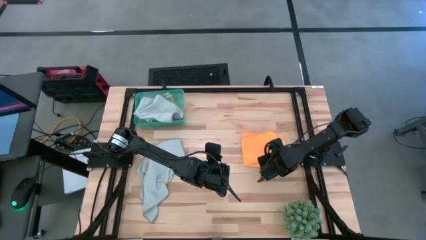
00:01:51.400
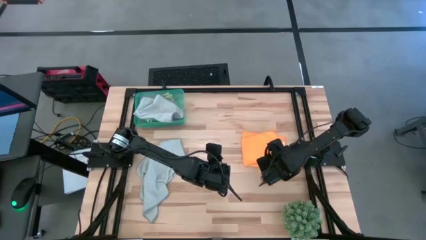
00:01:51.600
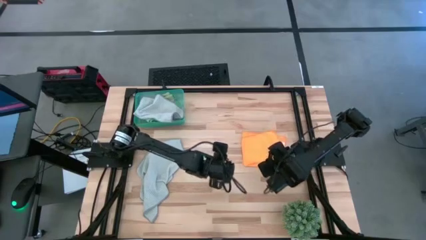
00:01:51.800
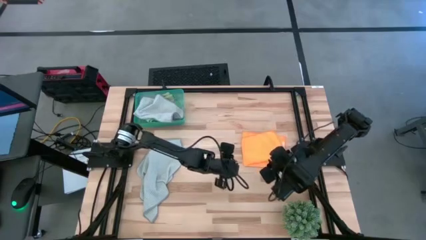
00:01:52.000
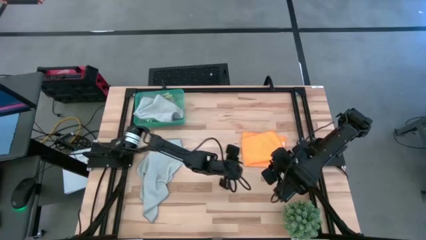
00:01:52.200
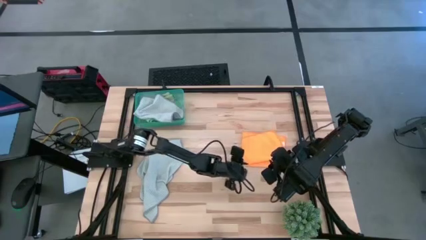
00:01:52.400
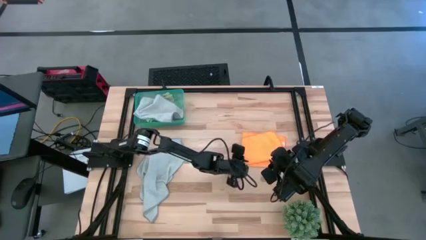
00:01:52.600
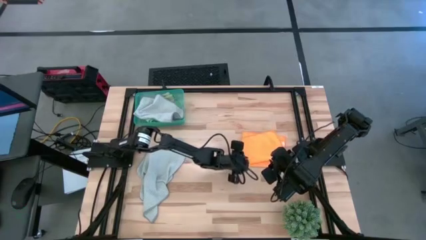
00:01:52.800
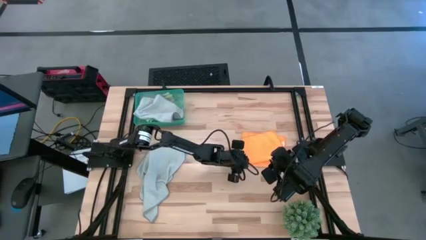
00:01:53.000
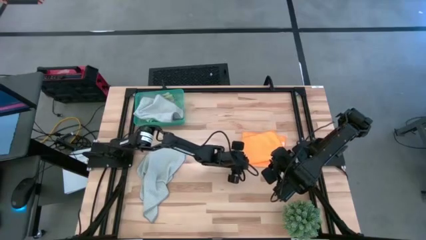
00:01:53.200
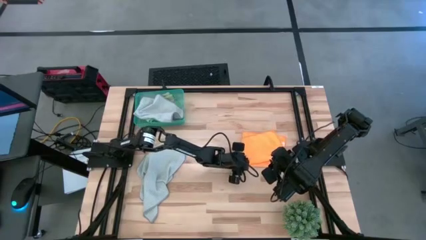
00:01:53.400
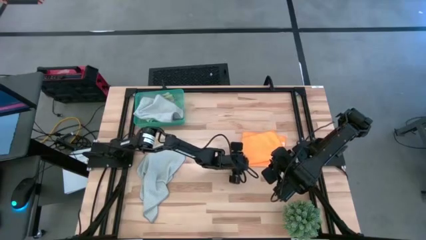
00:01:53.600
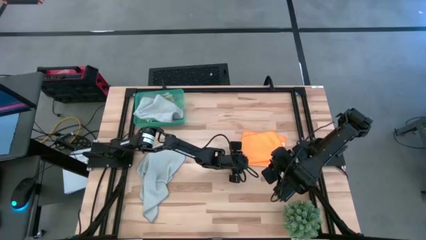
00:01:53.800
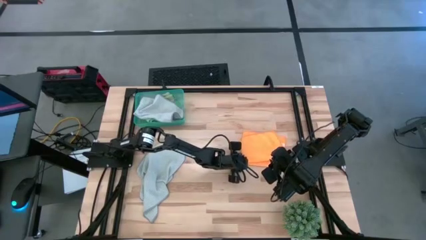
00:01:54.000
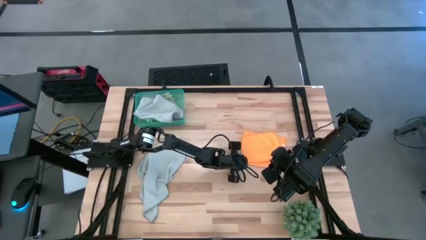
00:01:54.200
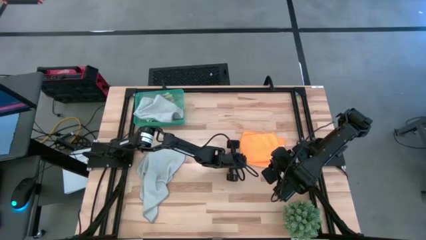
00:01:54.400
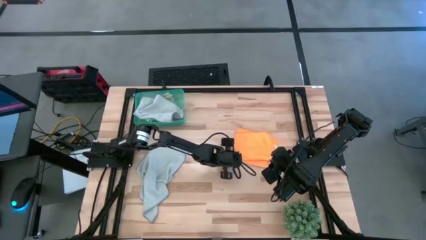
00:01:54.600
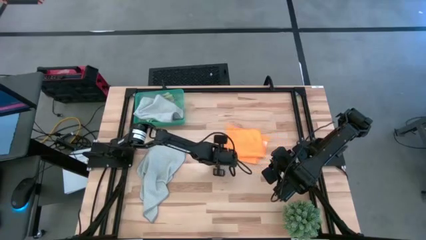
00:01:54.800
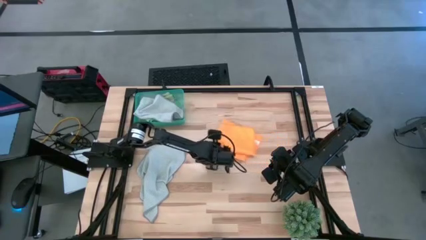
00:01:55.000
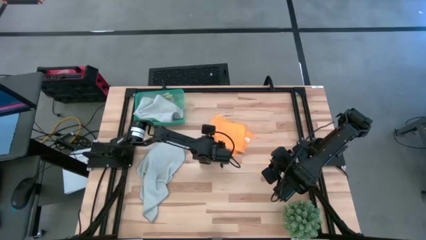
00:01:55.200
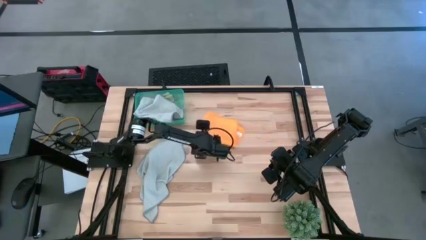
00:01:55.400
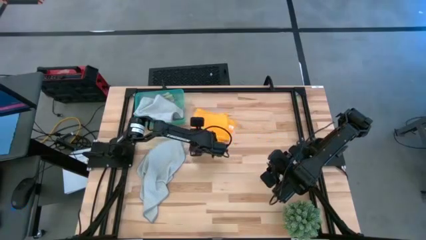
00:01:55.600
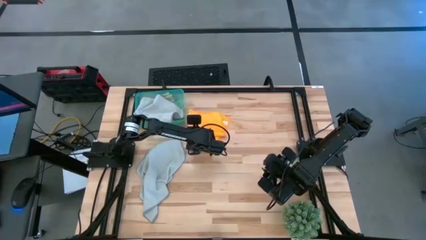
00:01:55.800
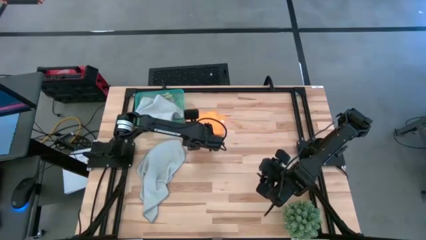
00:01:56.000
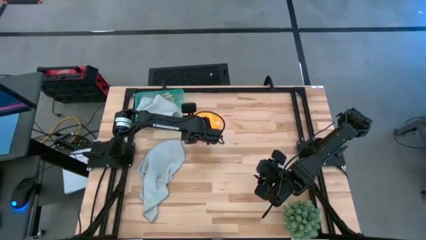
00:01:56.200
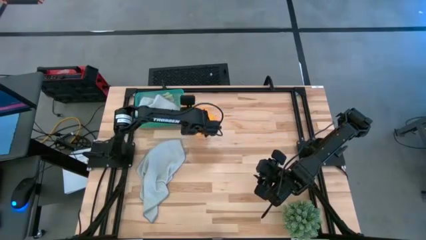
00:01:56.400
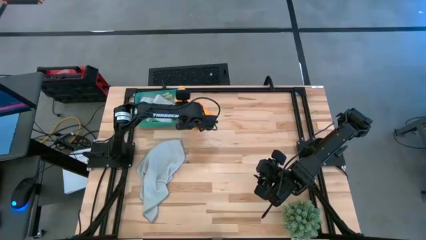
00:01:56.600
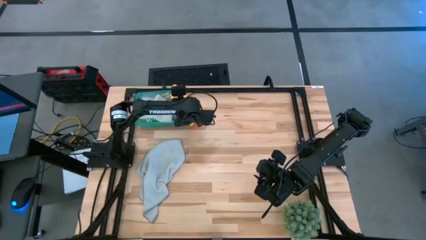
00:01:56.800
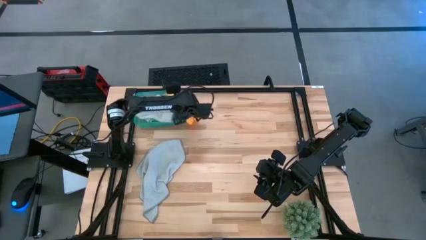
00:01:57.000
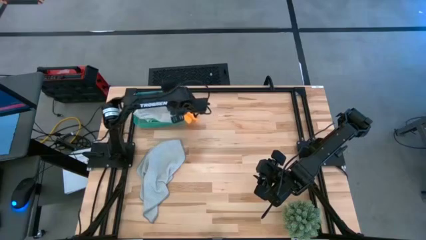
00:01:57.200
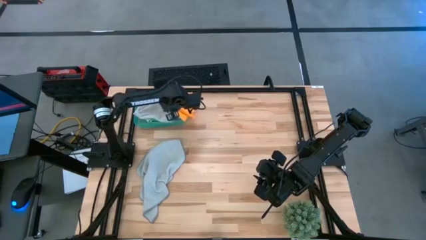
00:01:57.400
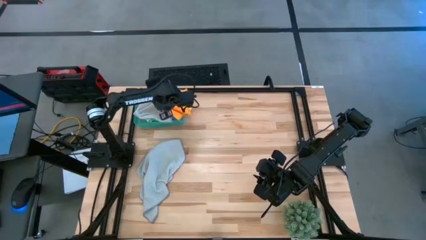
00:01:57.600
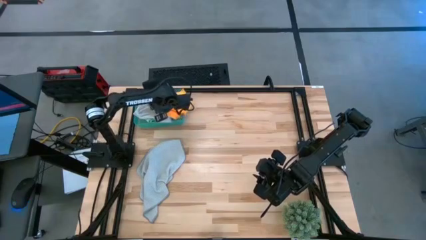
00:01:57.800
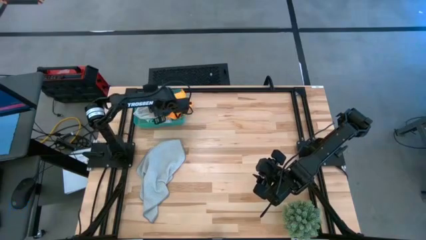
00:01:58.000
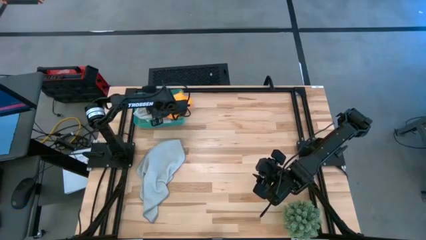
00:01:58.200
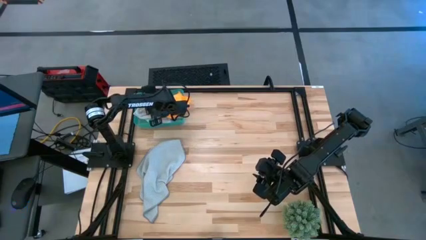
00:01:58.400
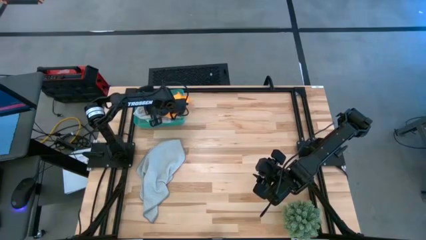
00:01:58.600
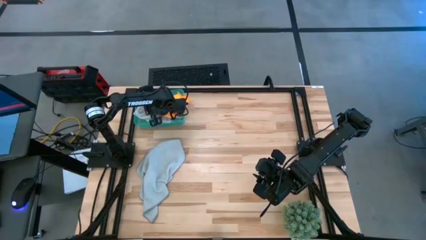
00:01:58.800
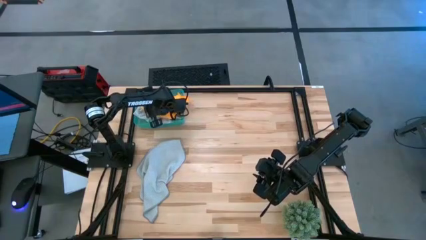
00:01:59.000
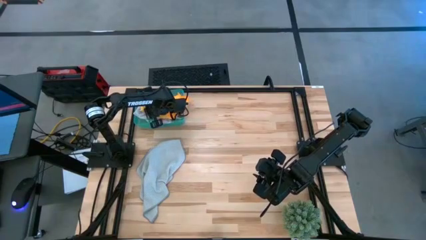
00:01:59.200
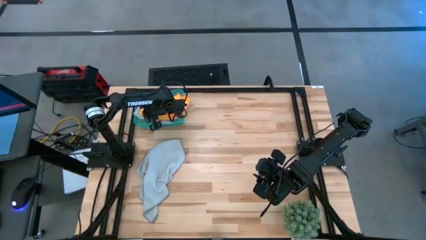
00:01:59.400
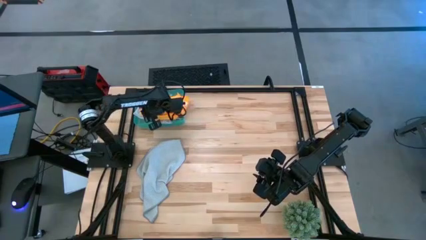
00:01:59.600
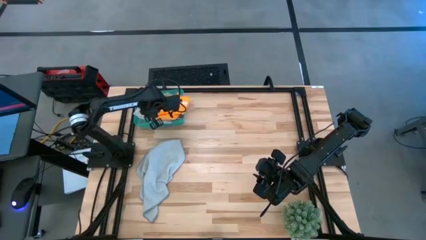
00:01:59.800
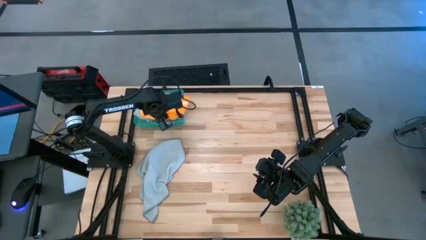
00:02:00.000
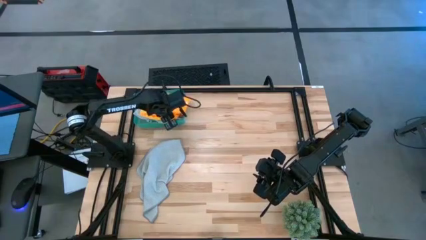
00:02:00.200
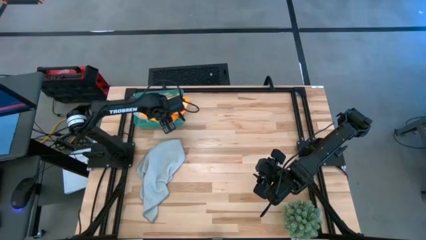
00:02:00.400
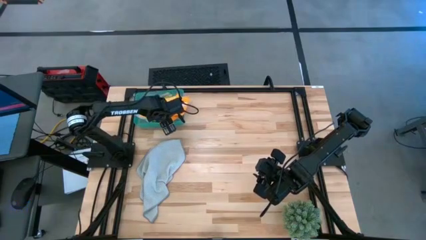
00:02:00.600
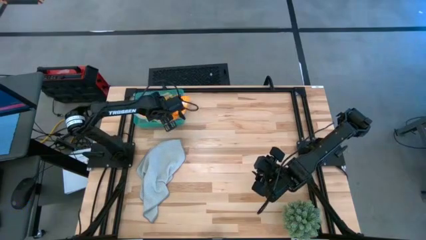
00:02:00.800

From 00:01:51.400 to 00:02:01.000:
Task: Fold microfiber towels
Put the folded orange towel into the bin

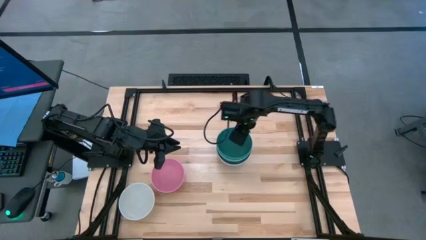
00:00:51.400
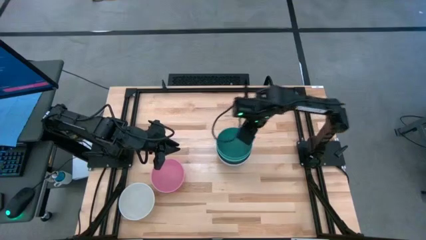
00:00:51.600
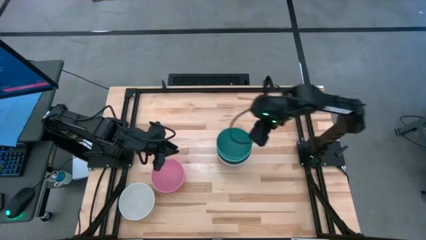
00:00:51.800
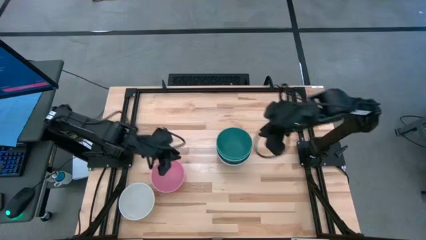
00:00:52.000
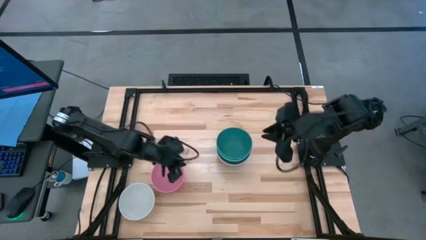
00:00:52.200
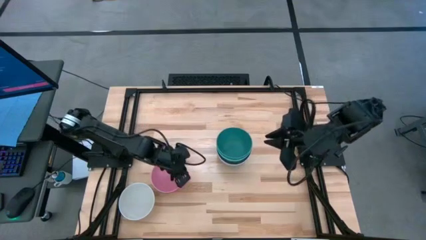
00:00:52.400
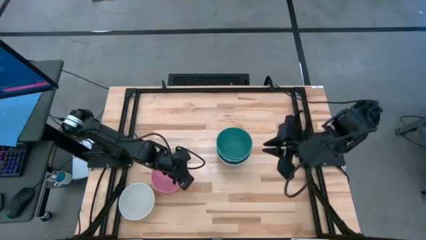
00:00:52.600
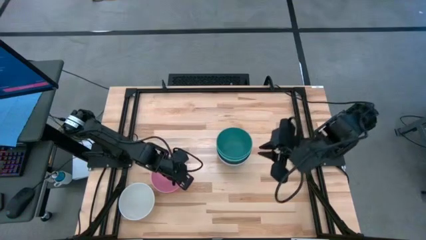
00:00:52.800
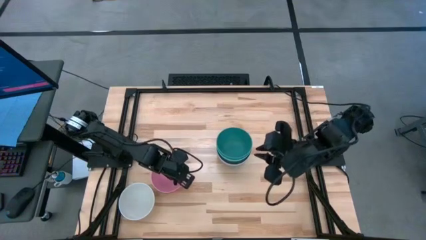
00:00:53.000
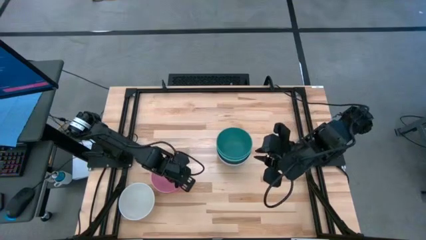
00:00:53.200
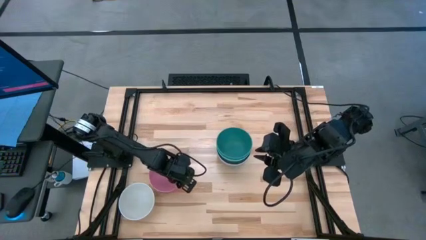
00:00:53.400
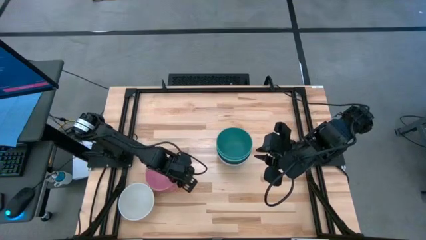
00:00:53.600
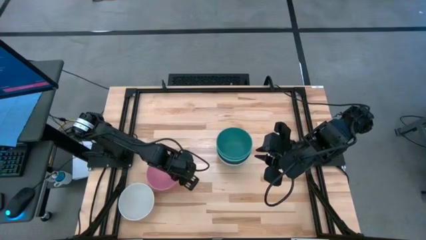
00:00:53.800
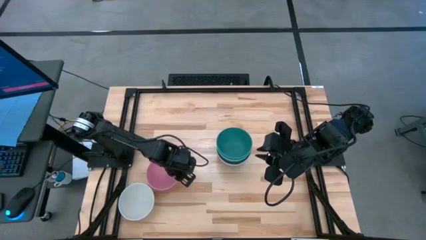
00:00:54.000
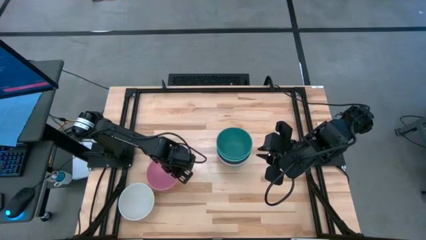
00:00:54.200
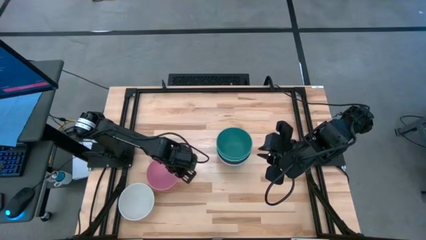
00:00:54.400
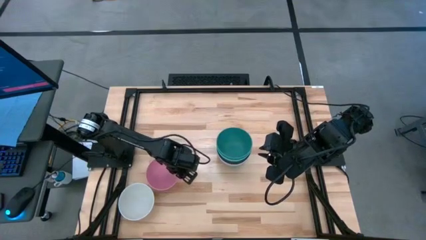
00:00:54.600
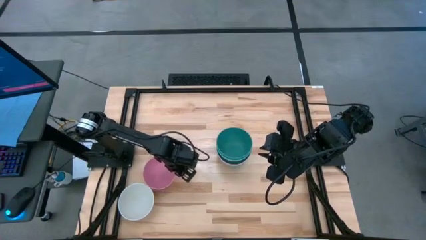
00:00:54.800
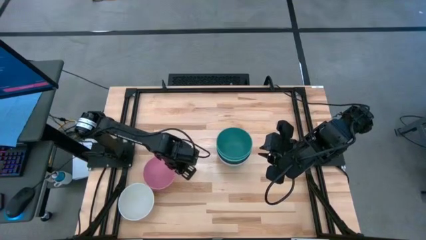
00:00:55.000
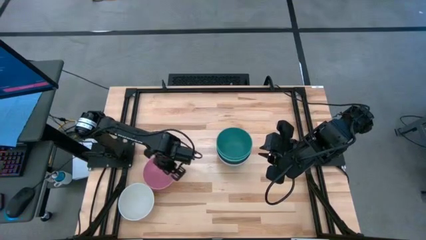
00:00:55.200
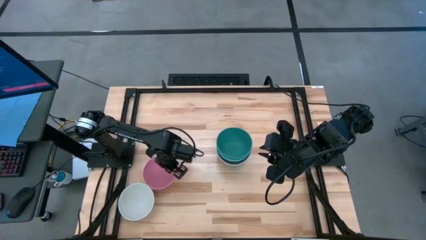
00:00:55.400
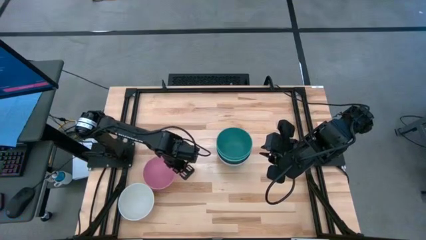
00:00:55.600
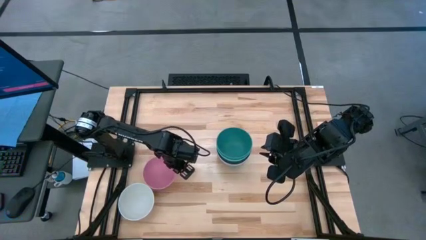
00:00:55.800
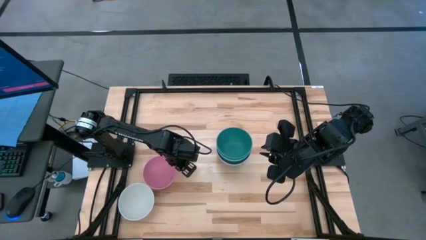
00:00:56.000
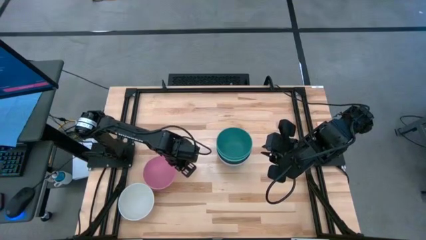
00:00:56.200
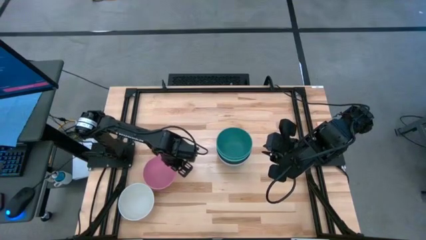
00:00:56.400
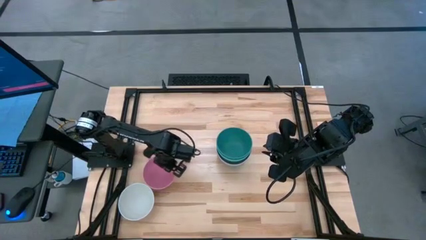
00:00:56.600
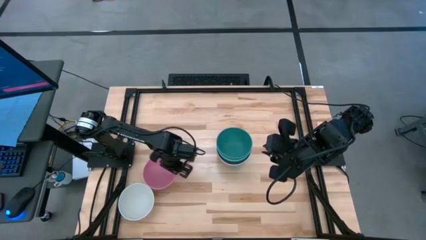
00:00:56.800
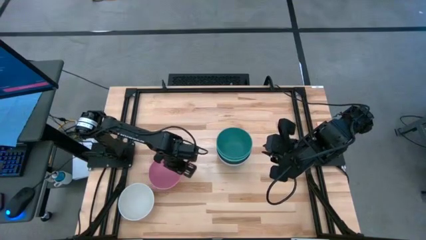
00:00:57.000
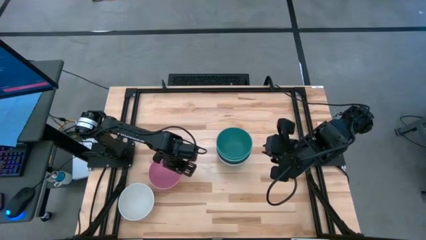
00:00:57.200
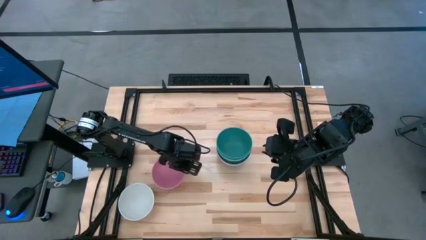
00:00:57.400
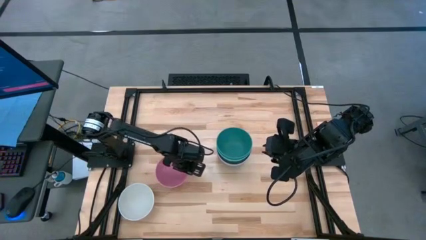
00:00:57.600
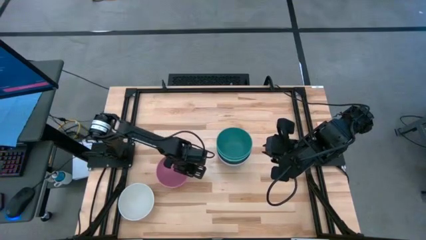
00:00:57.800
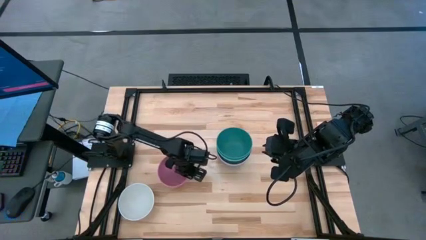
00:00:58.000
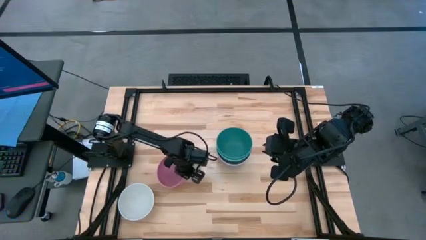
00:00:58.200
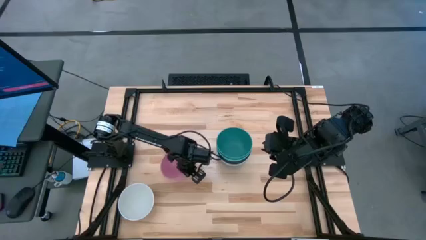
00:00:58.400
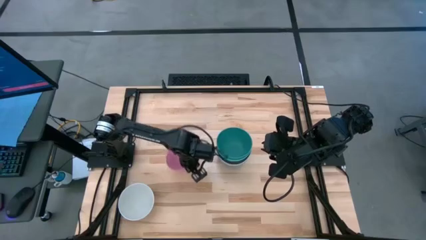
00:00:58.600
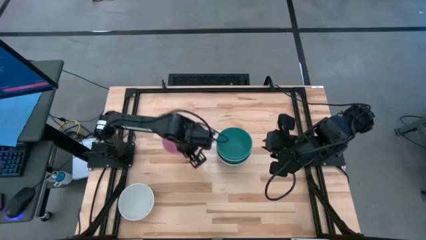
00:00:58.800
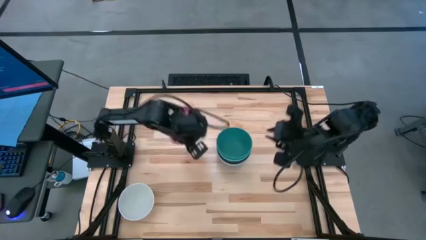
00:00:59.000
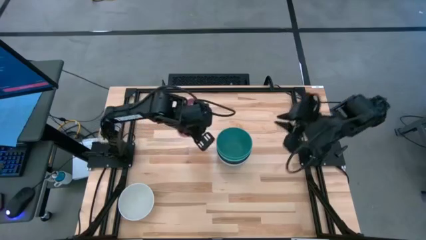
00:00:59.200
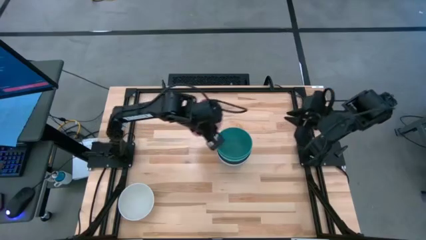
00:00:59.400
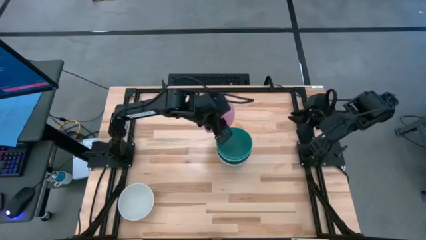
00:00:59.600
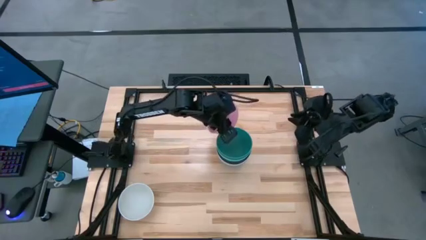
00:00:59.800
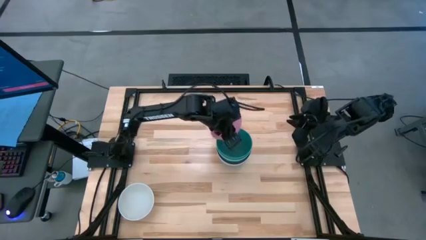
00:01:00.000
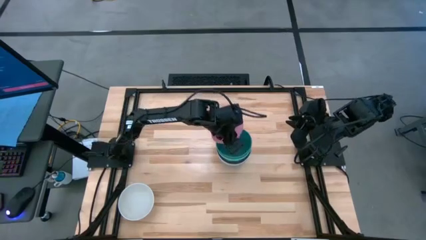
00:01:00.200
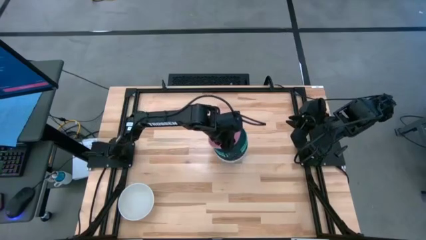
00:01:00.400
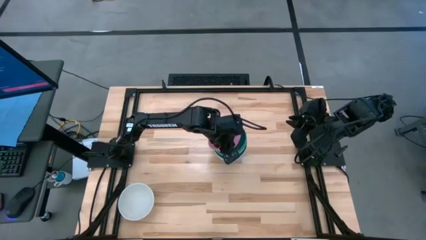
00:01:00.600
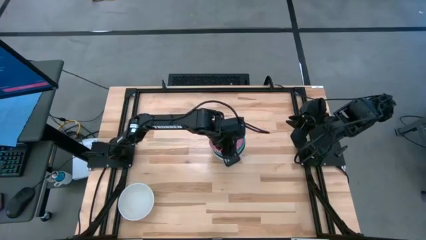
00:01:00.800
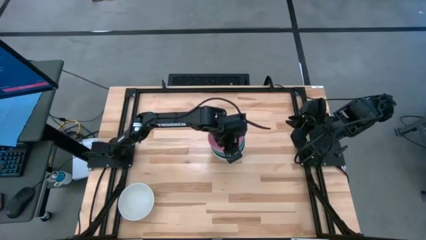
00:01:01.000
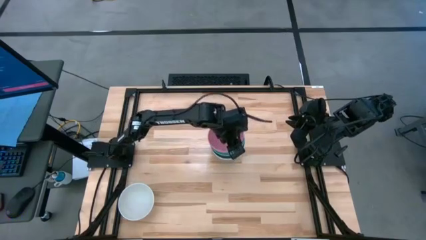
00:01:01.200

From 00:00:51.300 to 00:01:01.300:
Task: Nest bowls inside each other
Stack the pink bowl on top of the green bowl
